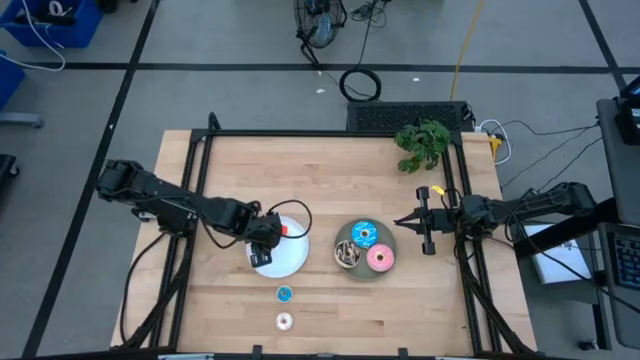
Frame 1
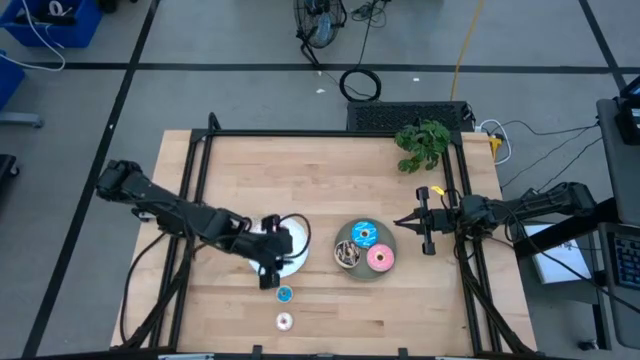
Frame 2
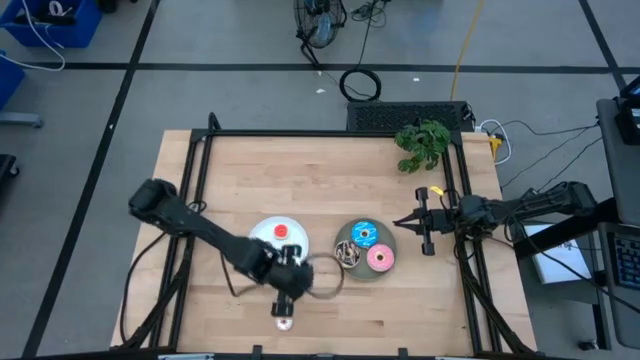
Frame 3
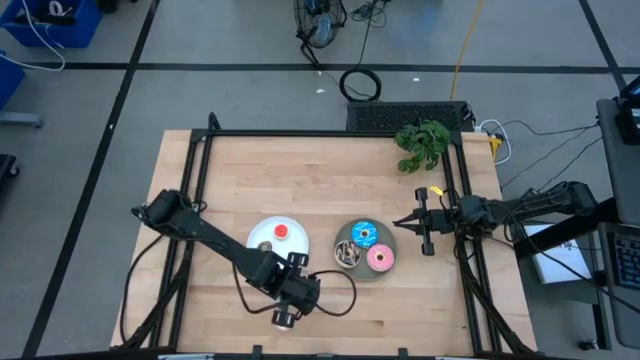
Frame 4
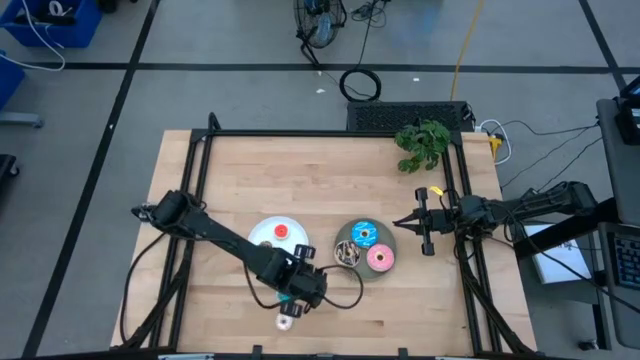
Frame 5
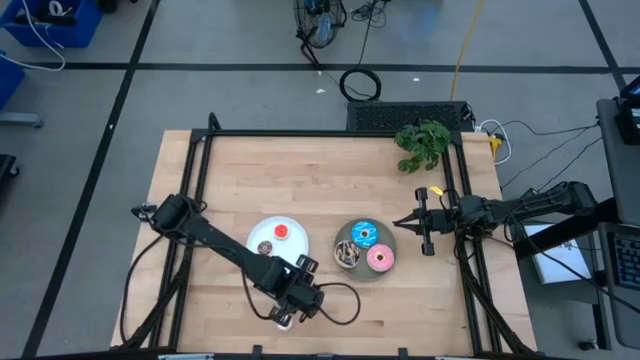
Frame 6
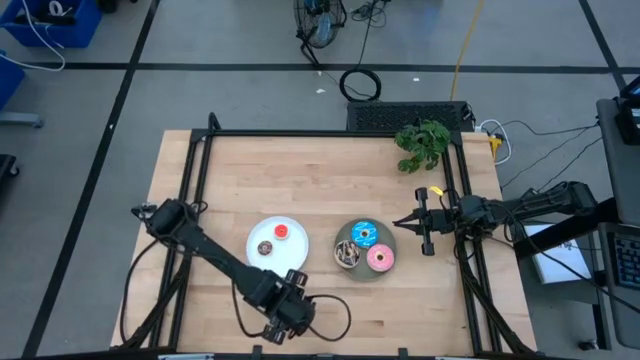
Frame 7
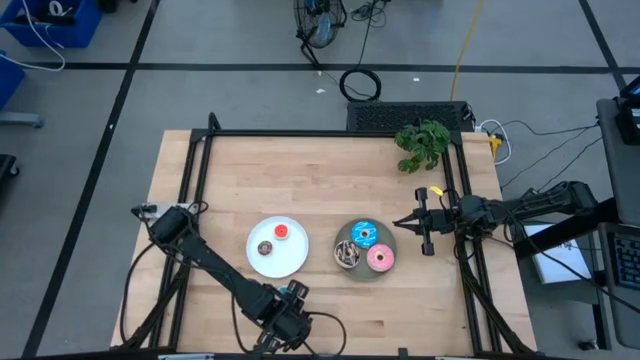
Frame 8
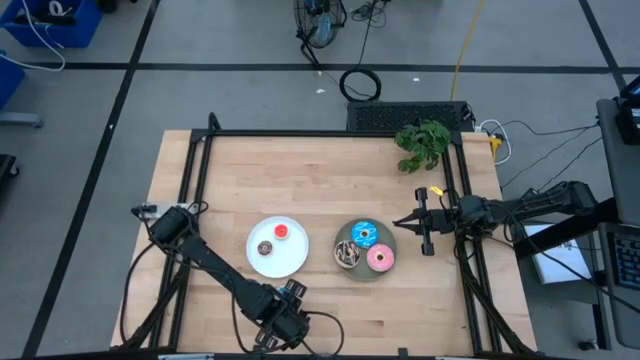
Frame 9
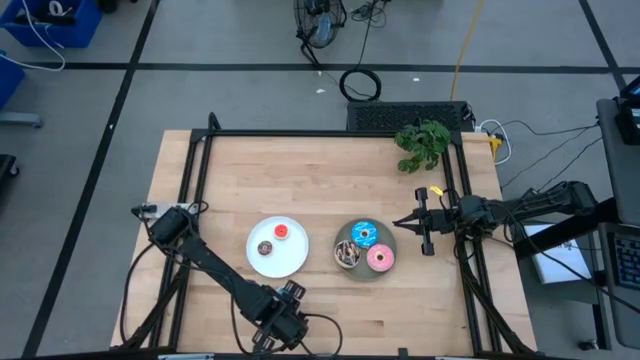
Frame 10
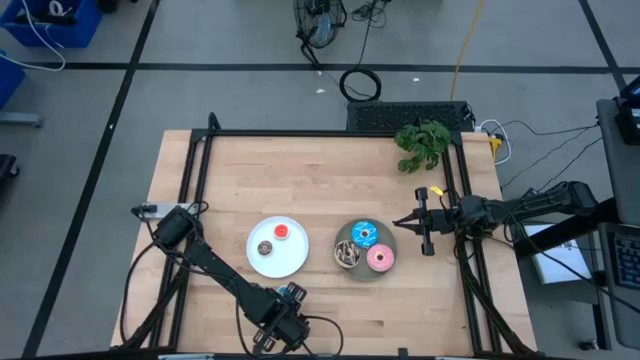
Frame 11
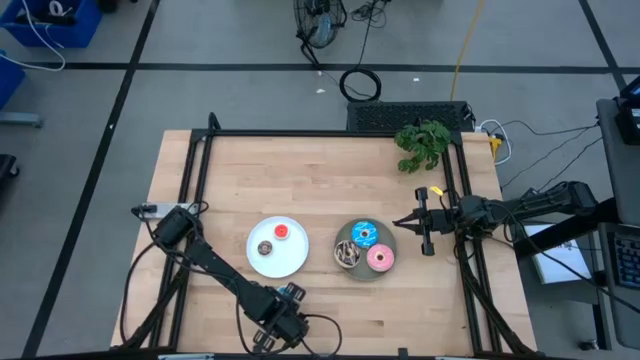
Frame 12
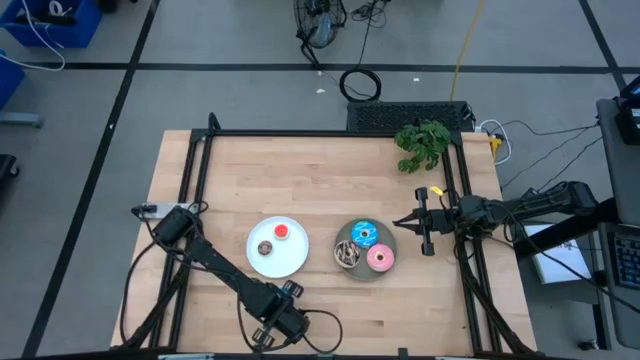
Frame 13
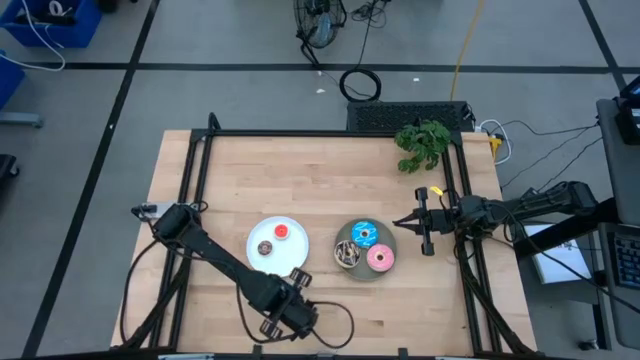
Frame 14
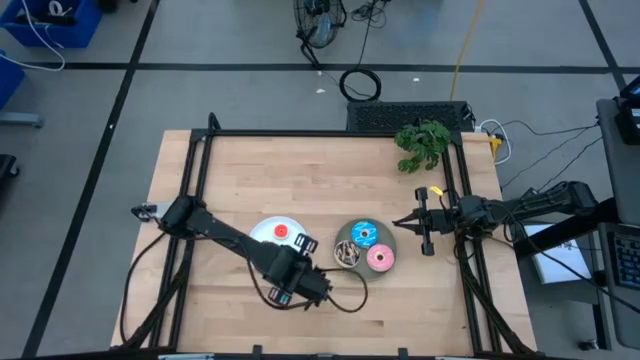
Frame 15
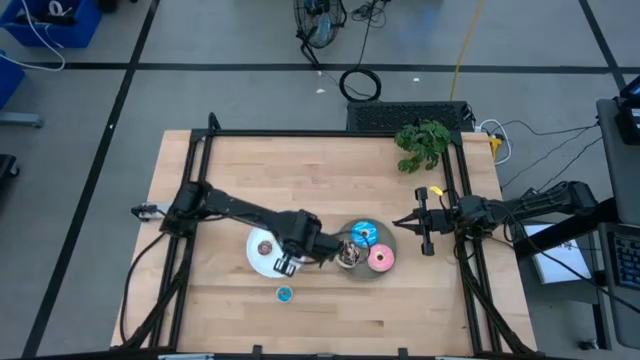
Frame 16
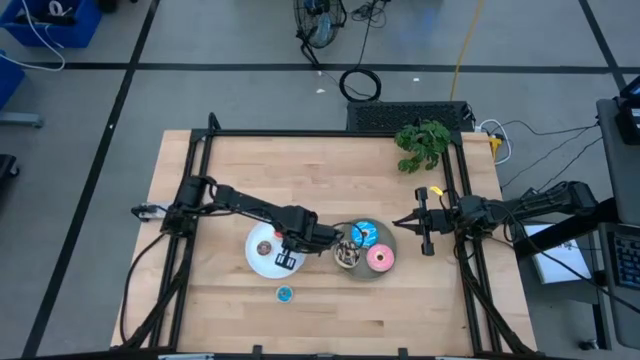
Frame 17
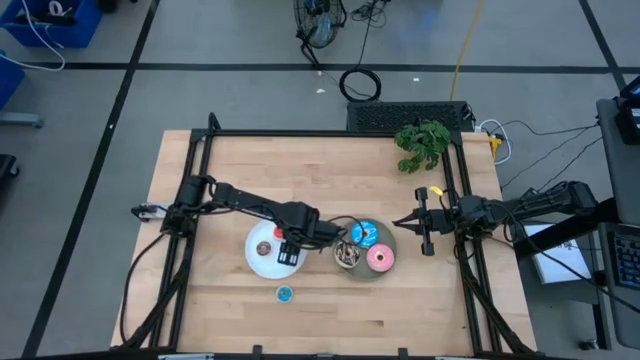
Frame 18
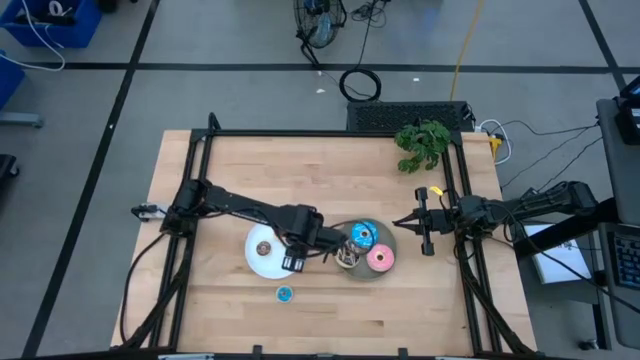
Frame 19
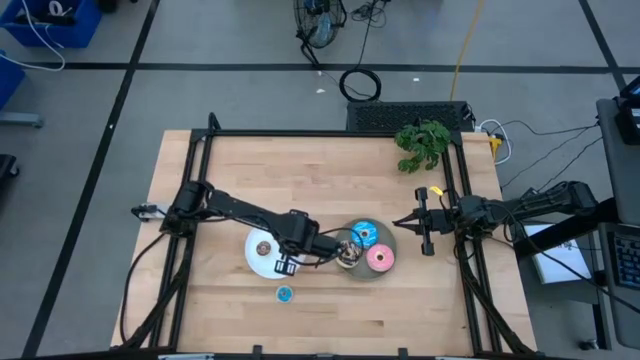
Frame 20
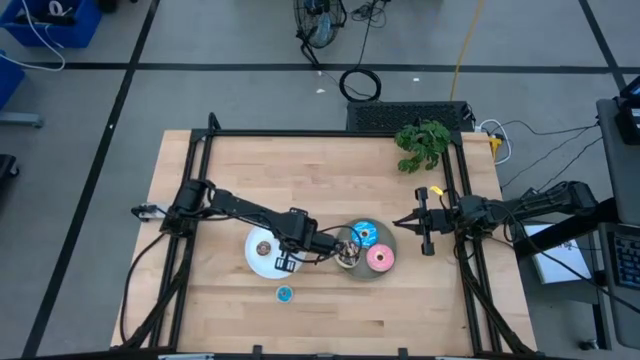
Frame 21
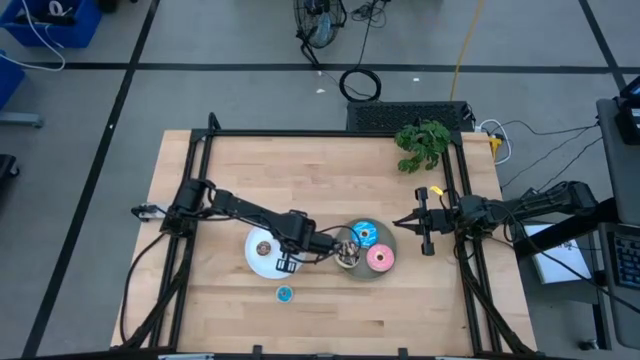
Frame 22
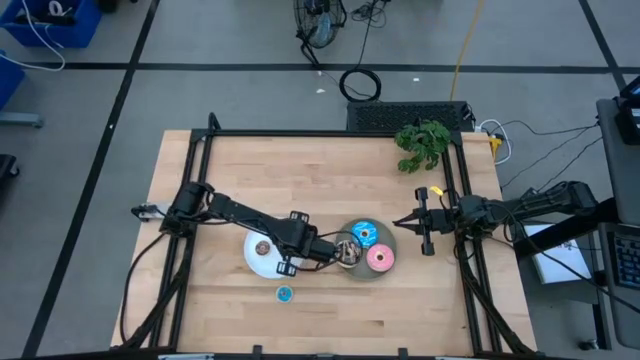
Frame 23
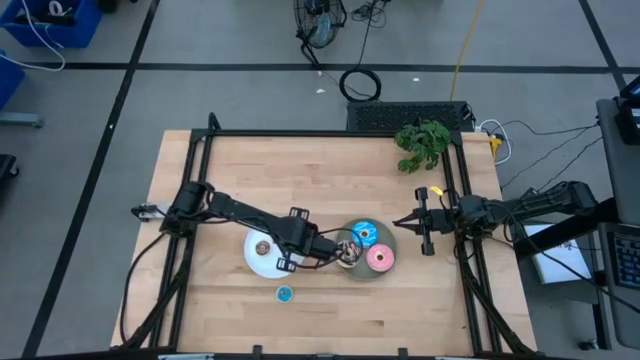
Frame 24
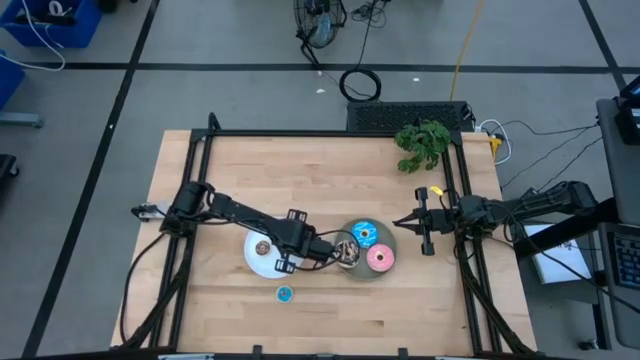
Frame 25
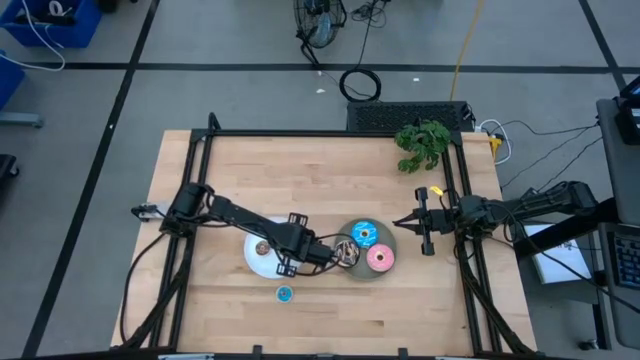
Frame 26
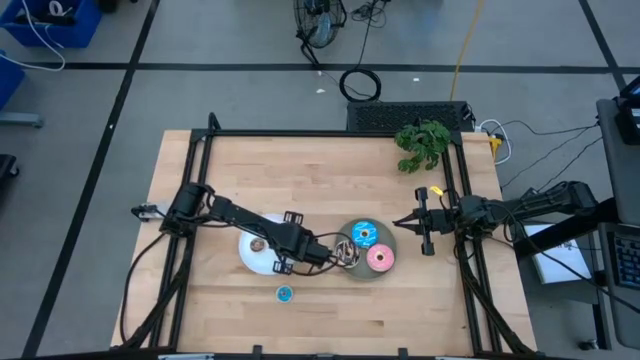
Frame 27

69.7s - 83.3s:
Task: Pick & Place donuts
Put the small white donut on the white plate

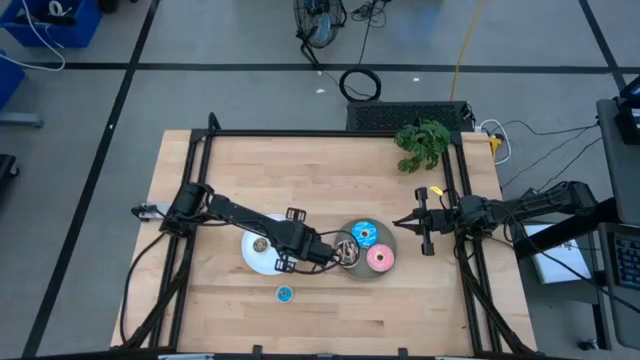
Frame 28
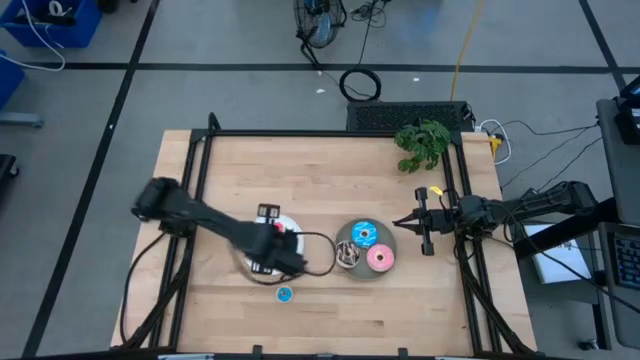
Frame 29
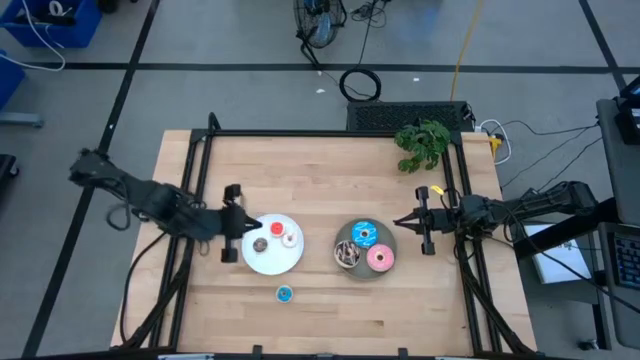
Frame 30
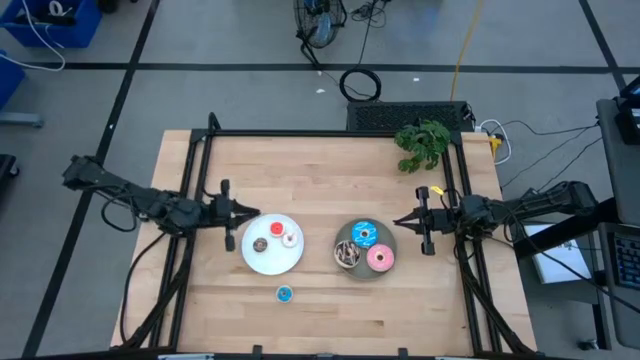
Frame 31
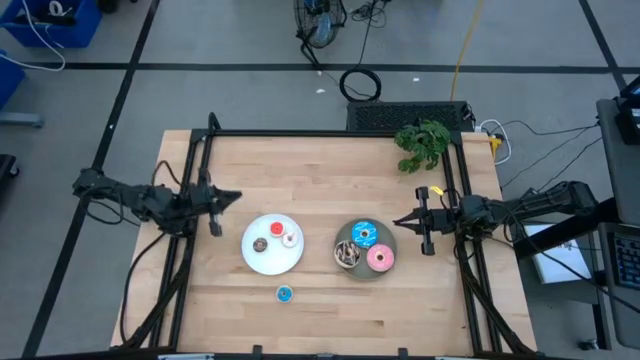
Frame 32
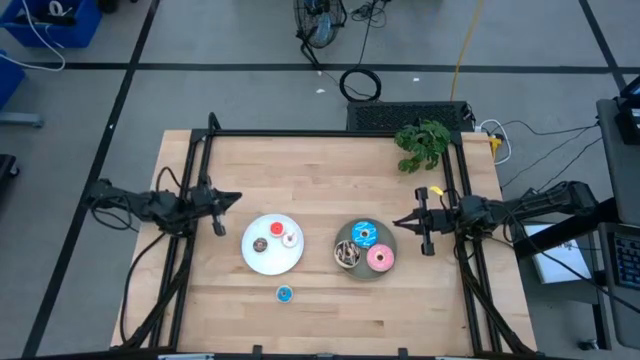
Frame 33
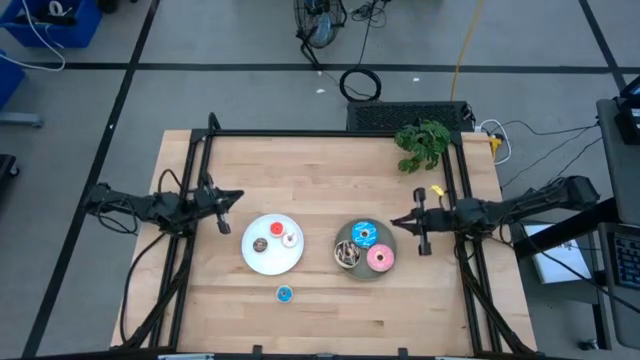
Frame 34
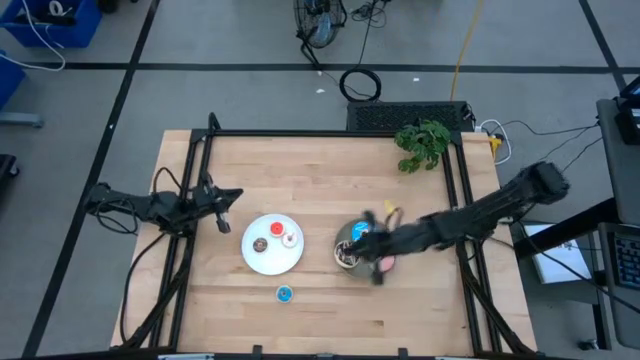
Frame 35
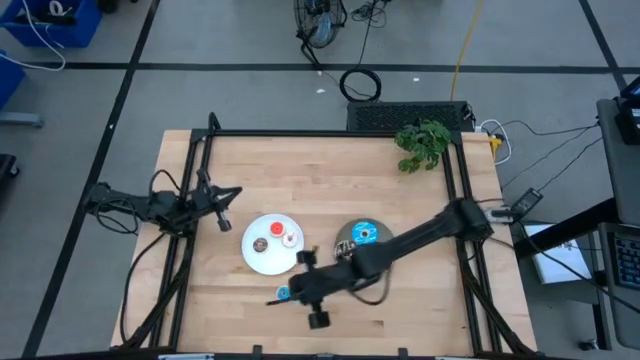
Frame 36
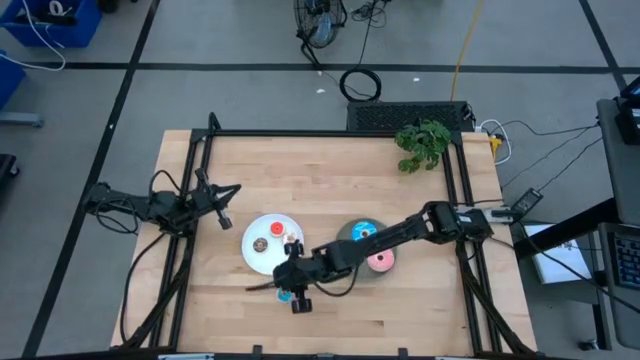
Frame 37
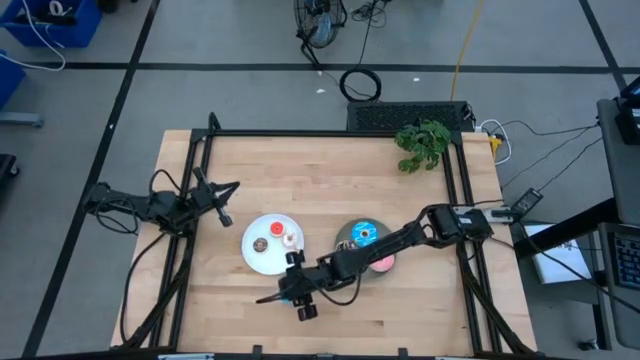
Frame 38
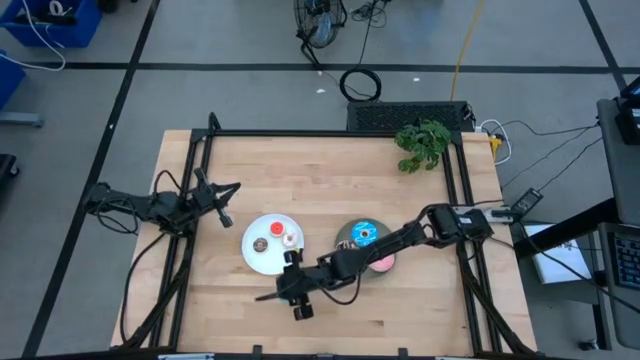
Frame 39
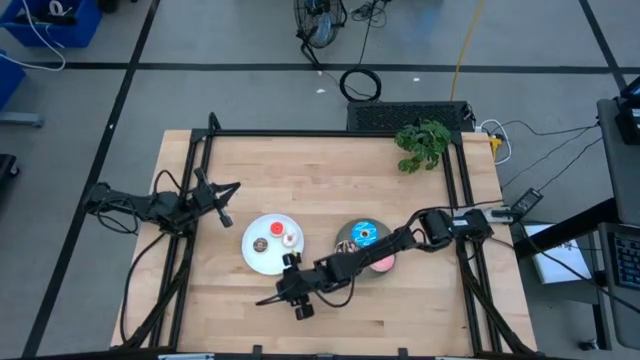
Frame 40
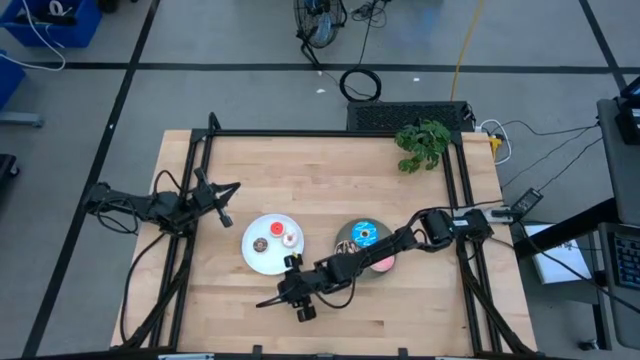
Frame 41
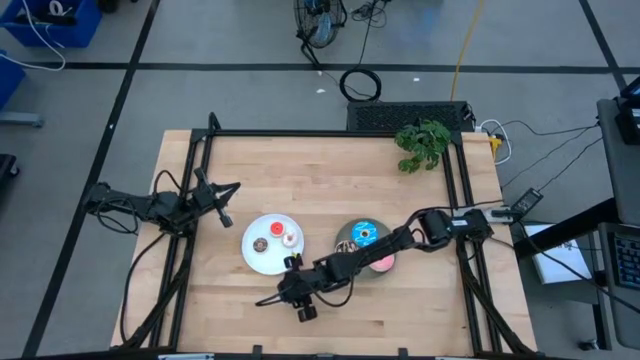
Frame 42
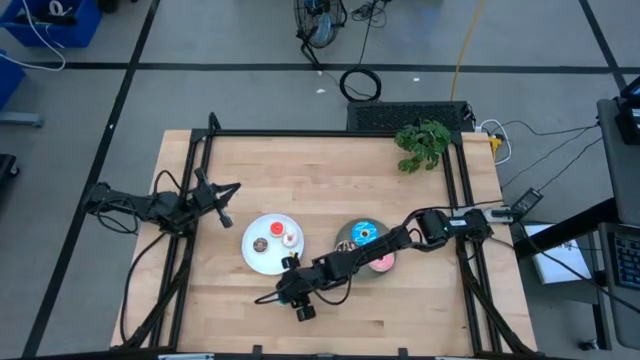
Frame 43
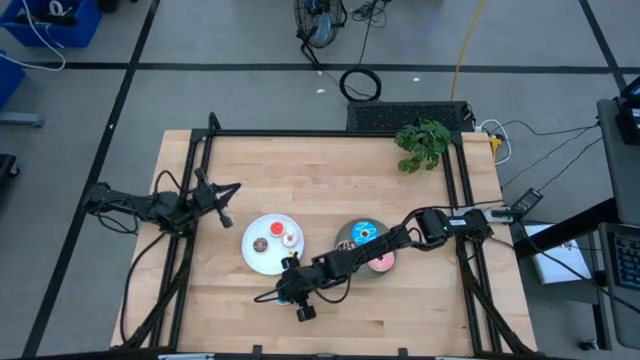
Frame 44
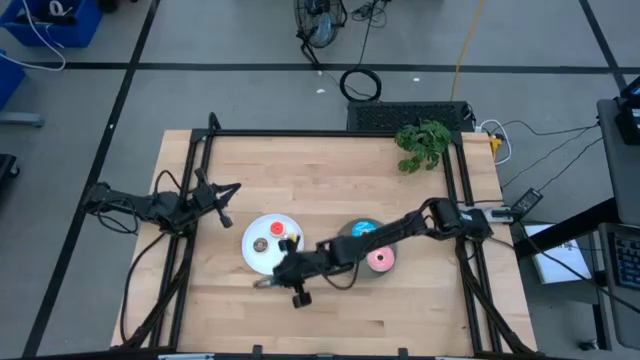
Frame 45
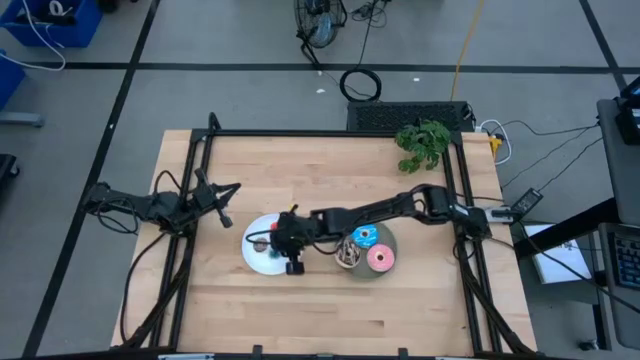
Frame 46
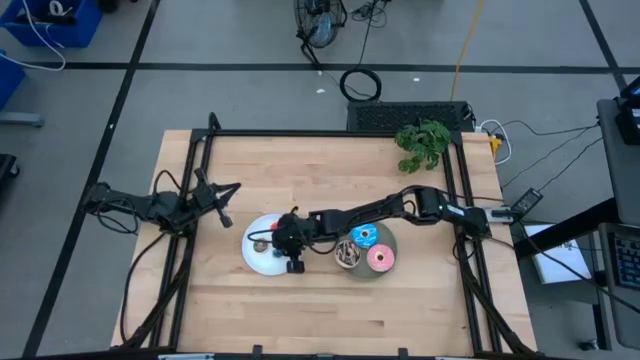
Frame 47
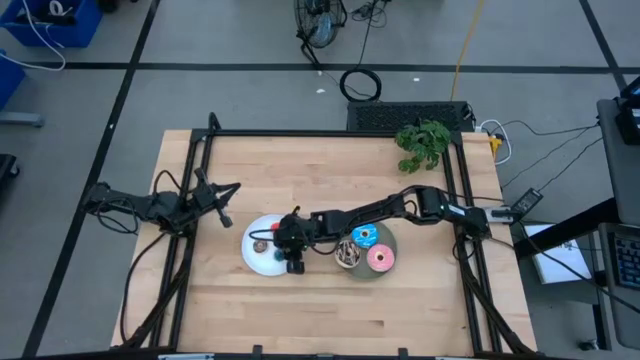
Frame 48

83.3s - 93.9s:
Put the small blue donut on the white plate
